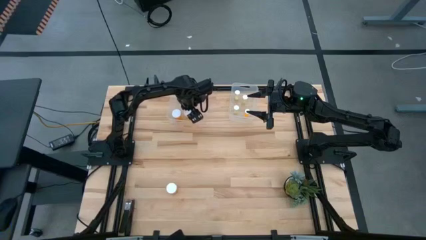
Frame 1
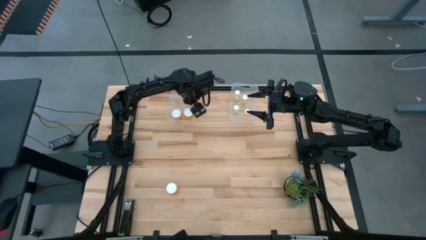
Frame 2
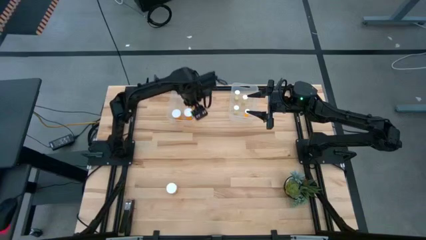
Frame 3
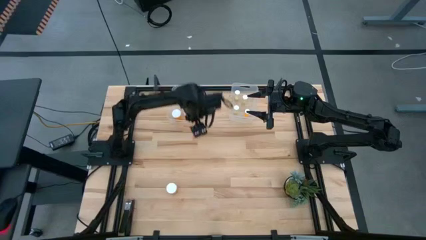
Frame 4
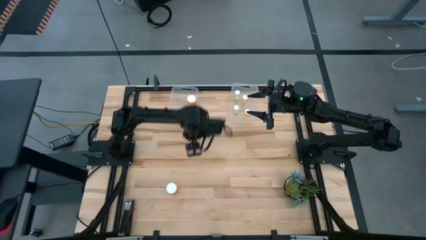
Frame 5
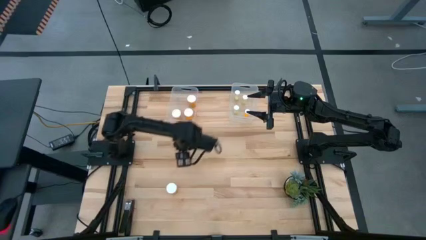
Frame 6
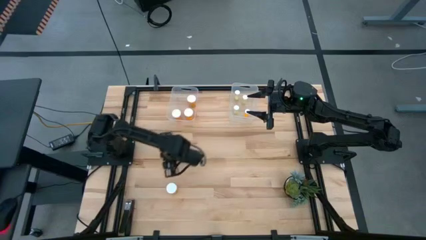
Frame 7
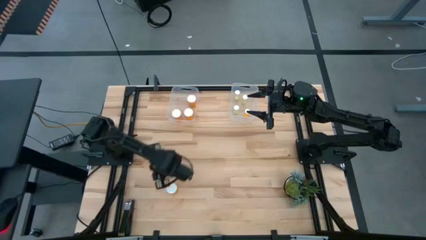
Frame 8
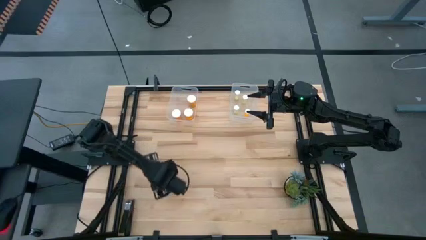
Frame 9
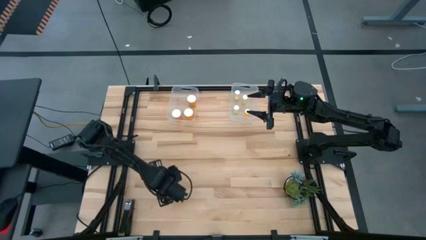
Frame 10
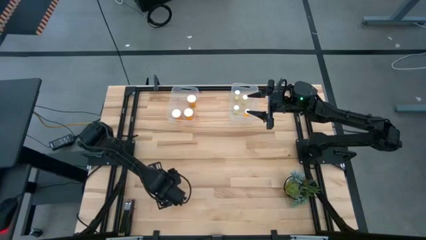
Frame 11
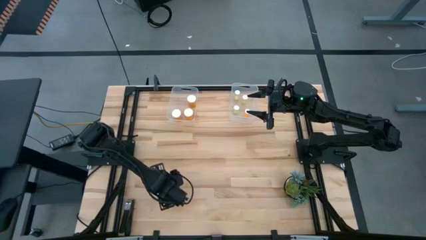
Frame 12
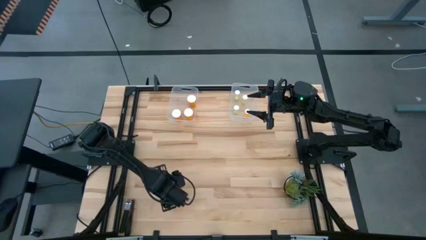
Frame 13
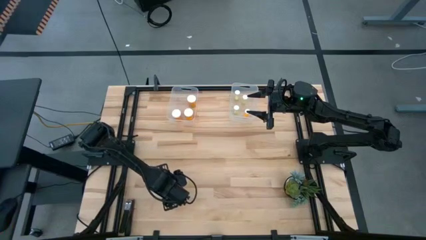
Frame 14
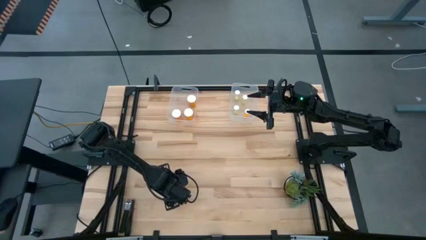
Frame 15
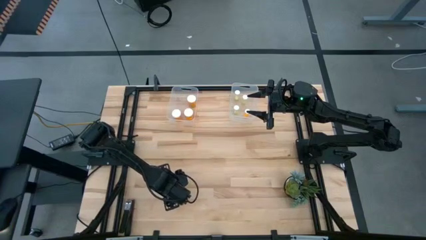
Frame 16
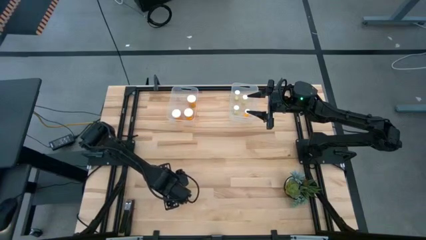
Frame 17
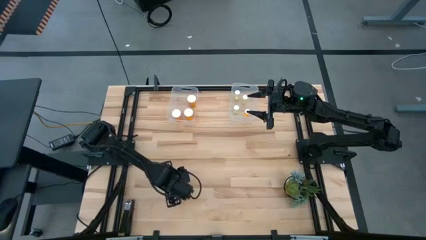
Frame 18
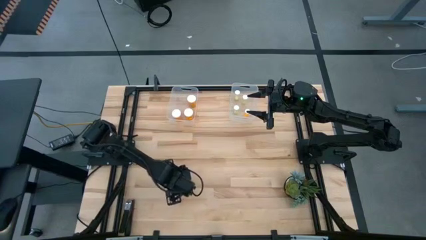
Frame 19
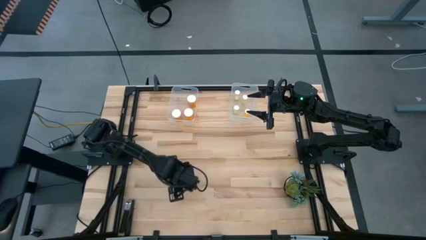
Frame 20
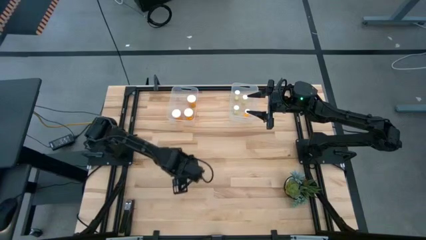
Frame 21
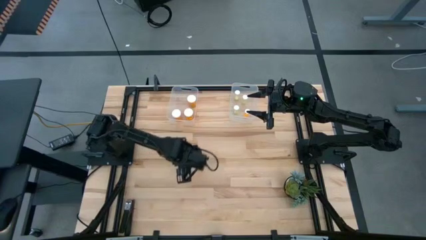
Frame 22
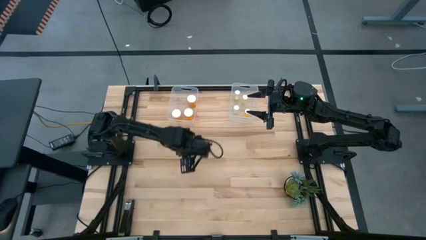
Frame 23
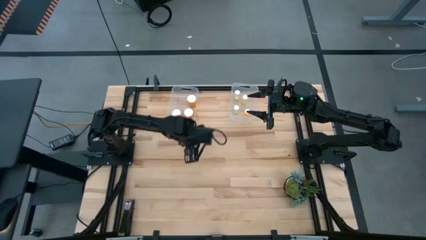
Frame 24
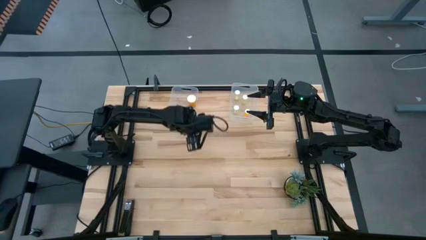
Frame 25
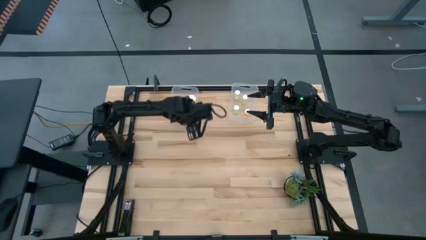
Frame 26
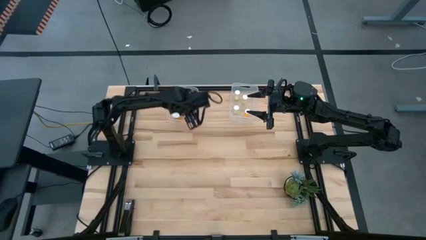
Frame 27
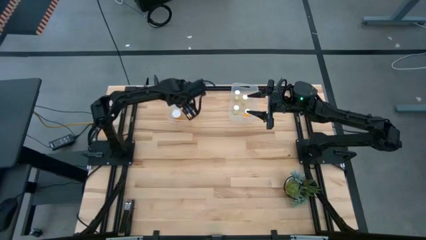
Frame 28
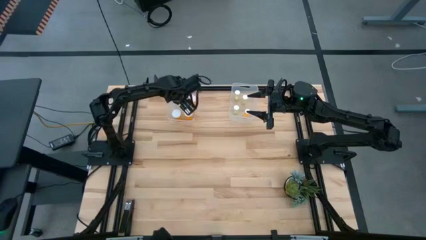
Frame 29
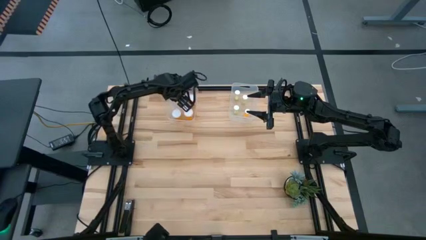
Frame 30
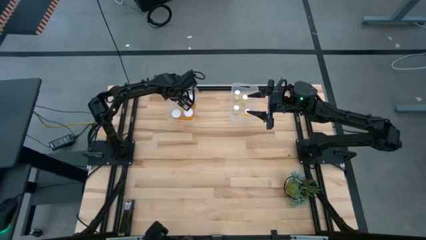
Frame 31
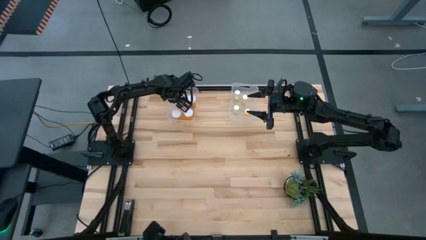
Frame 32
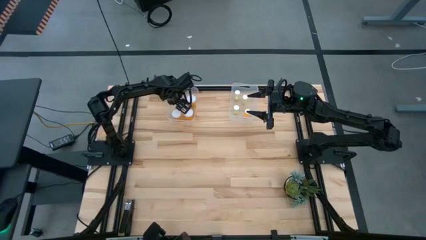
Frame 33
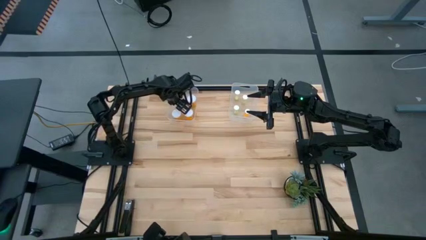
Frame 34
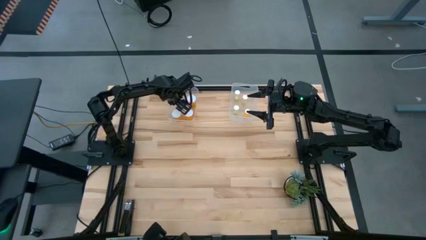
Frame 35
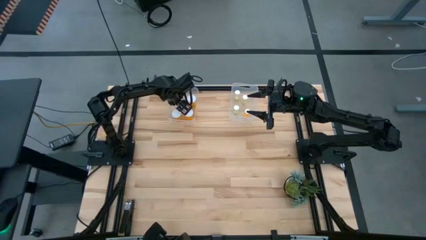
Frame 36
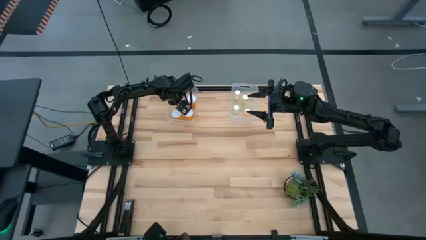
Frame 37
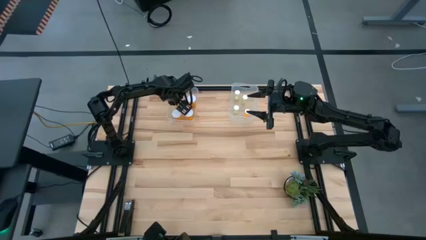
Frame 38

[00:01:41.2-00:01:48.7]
Task: Pick and place medicine bottles into bin by pill shape (circle, oval)
Put the big orange pill bottle into the left transparent bin

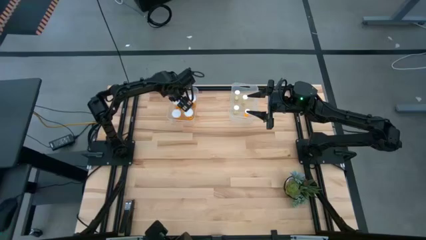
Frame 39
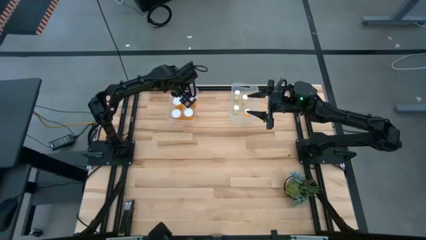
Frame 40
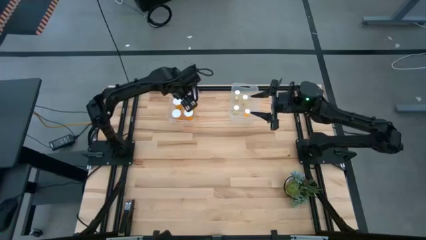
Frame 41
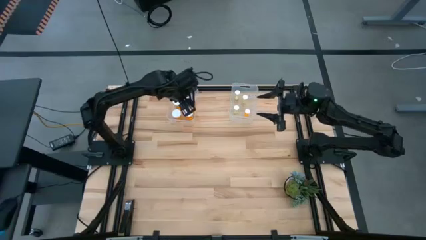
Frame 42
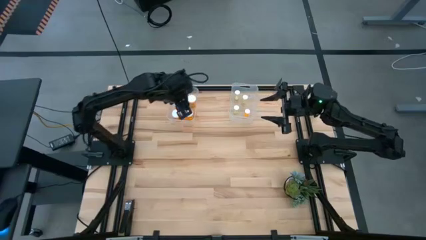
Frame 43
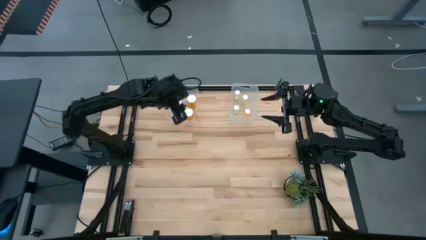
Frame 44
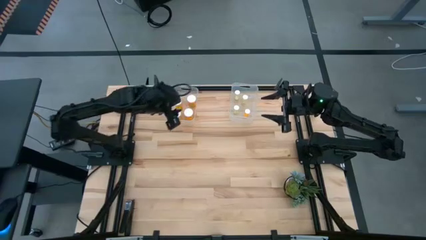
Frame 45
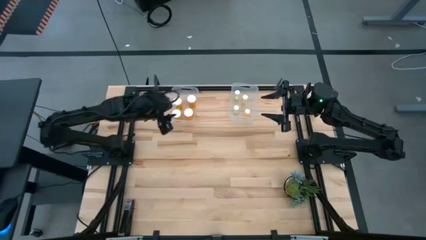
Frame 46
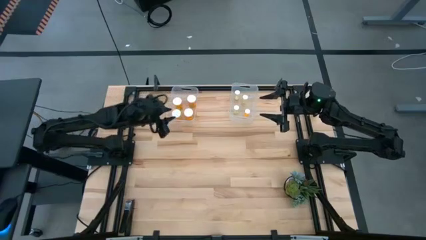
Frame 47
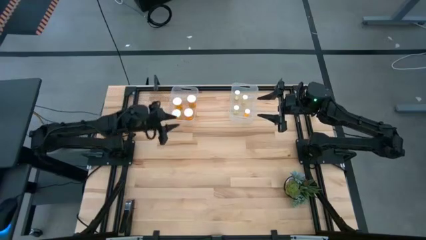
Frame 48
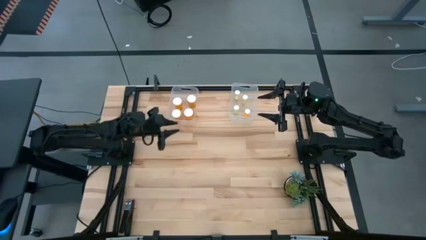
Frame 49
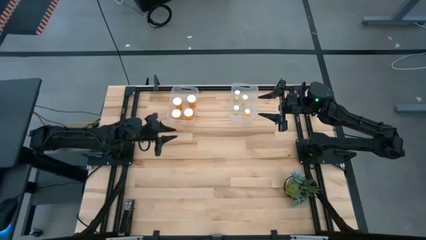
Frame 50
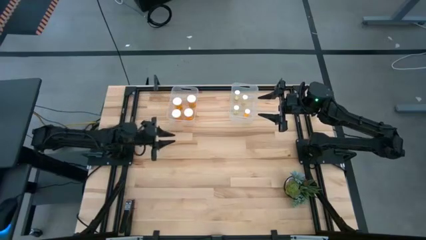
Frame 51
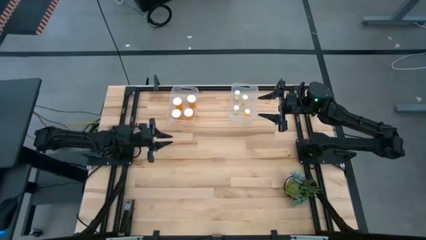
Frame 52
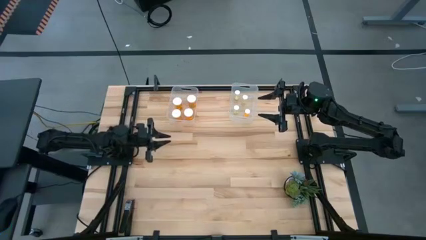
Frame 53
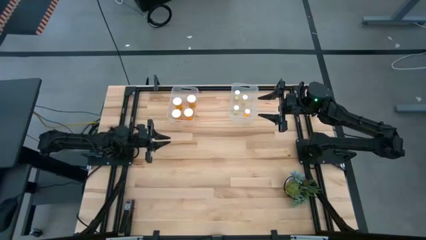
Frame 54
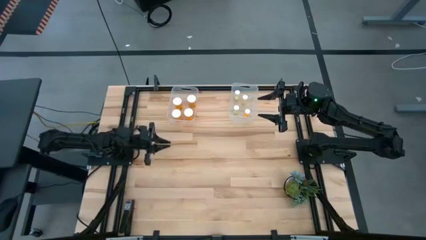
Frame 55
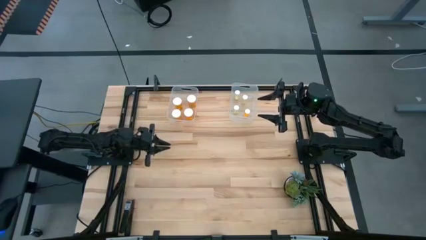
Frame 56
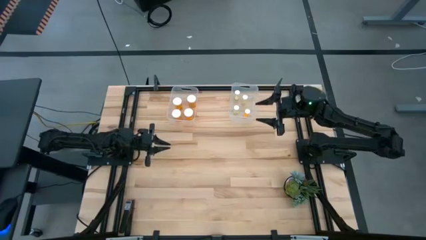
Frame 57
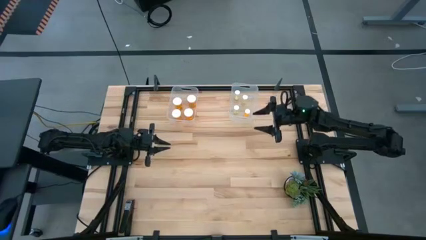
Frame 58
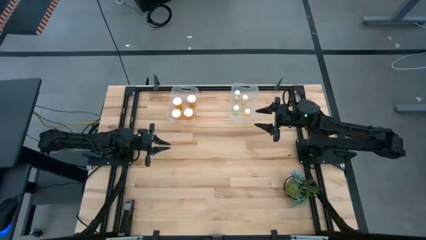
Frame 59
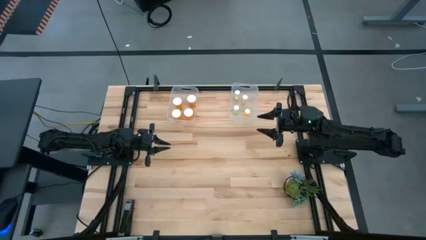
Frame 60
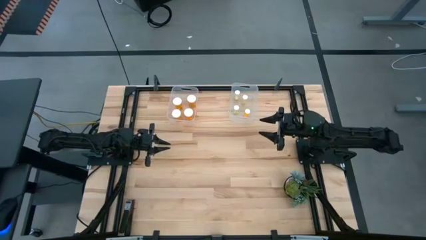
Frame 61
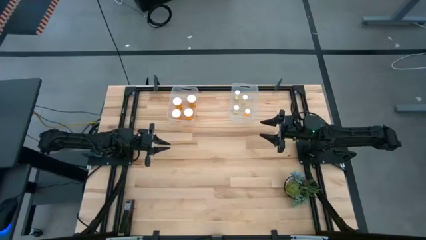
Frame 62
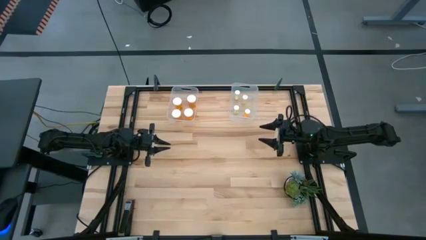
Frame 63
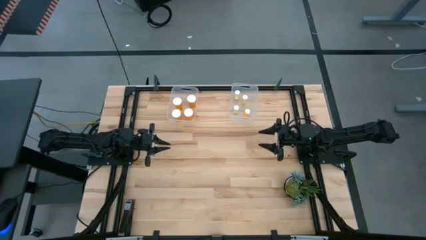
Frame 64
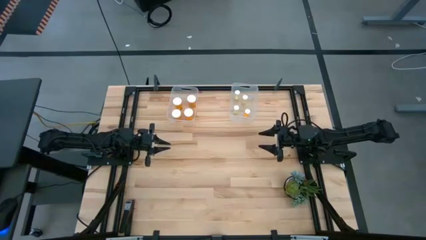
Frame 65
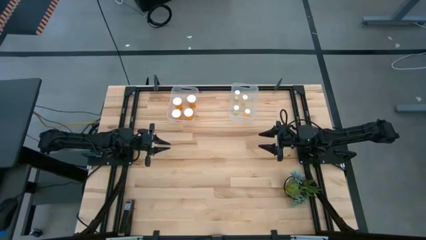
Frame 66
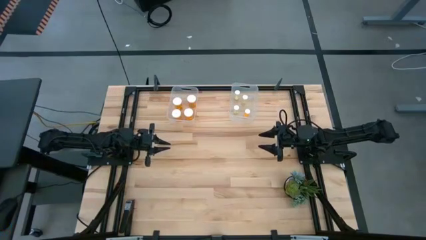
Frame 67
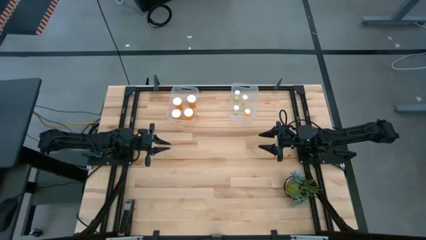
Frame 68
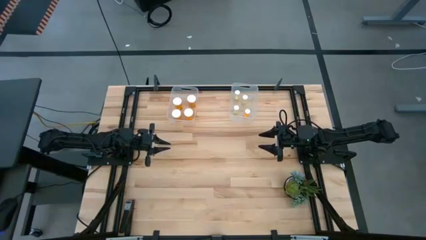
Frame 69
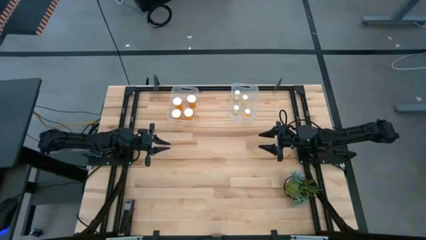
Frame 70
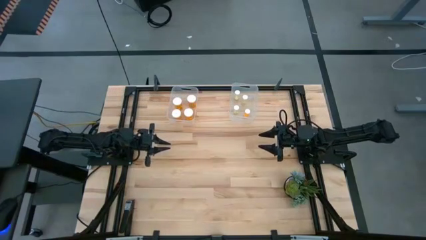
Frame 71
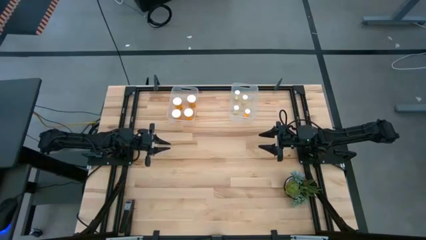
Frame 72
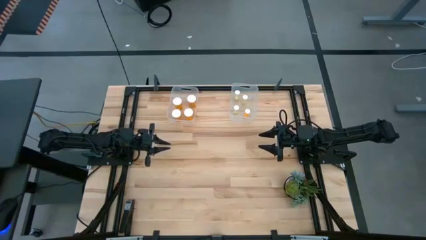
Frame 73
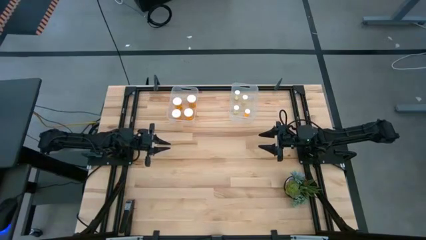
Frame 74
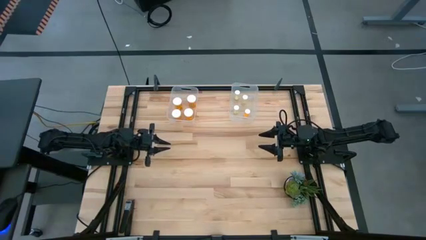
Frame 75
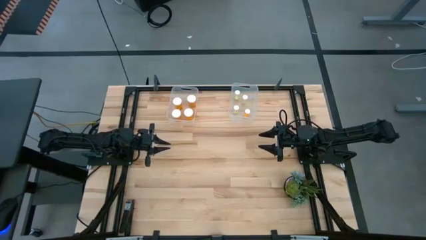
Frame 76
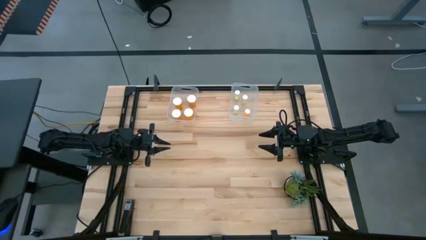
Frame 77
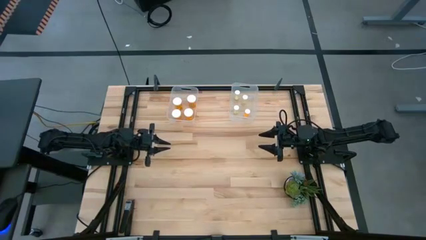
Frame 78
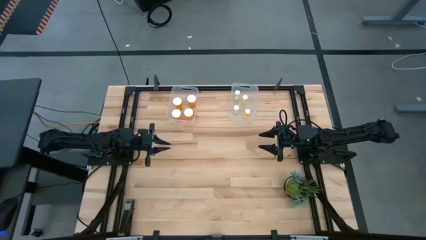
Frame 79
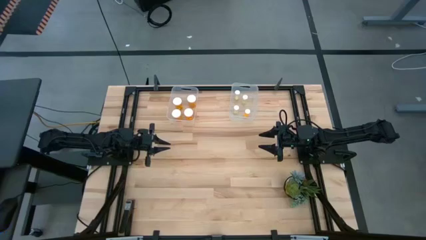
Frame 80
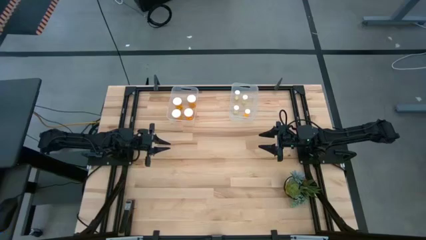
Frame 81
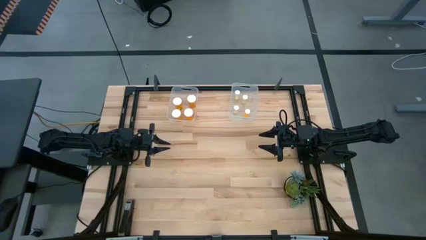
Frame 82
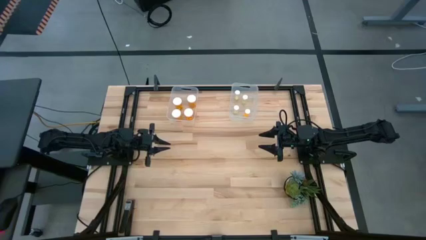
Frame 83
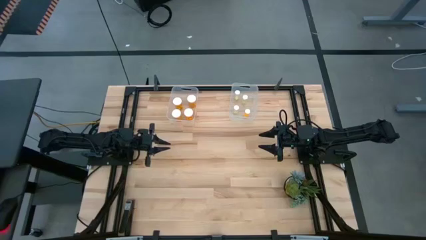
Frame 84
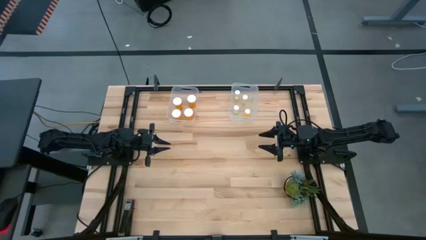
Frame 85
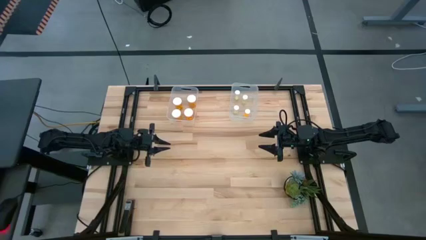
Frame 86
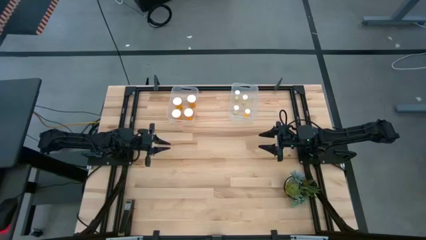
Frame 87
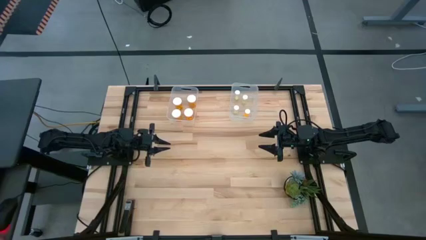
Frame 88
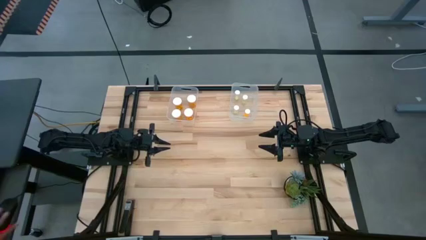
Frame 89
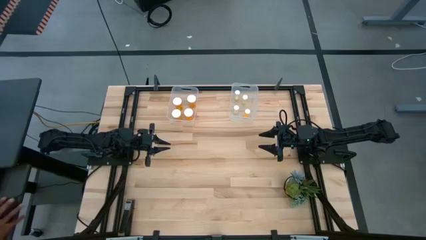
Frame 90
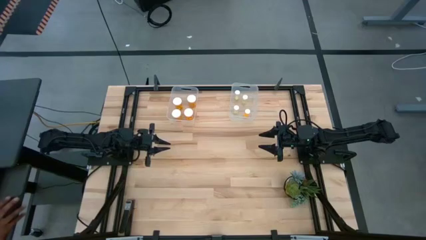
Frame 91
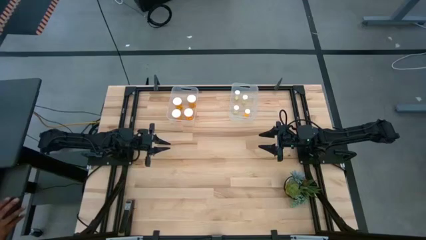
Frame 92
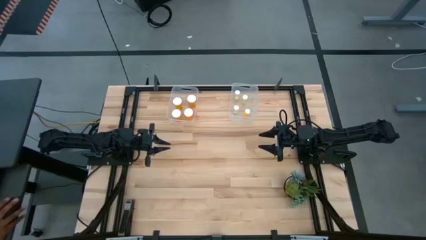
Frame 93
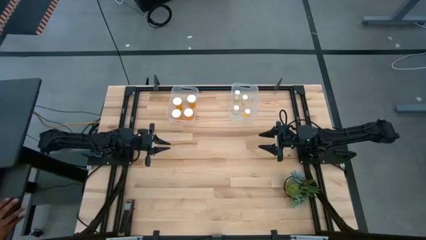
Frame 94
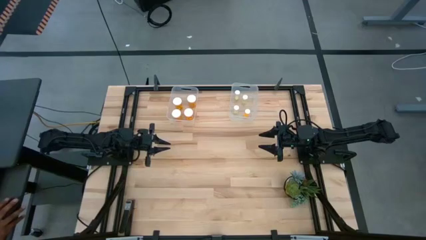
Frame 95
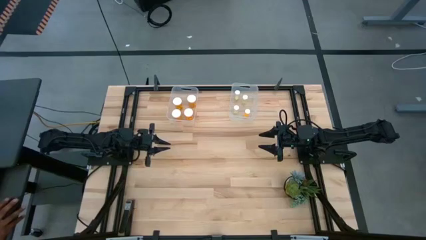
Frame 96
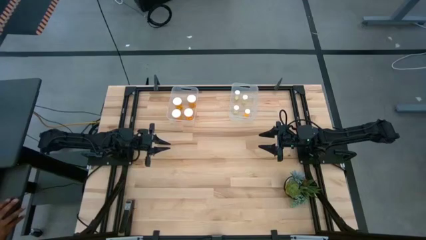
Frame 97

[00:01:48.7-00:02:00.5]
Return to Home Position
